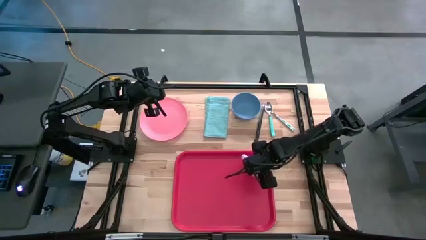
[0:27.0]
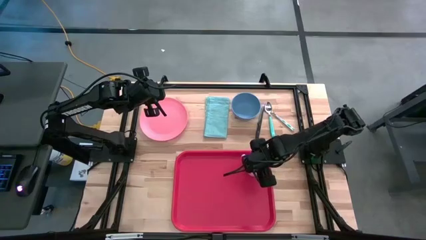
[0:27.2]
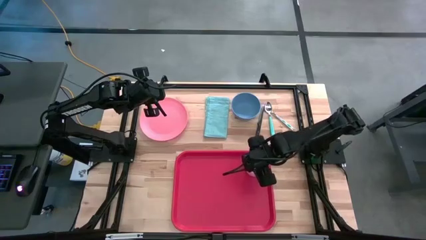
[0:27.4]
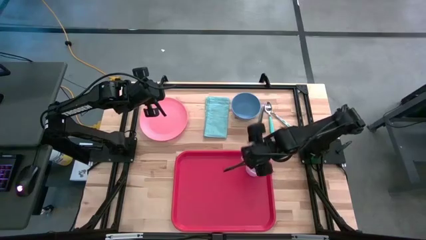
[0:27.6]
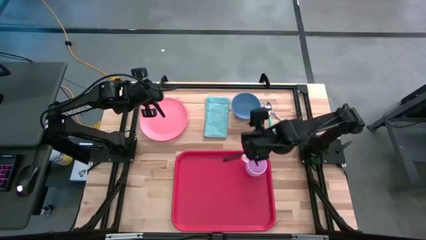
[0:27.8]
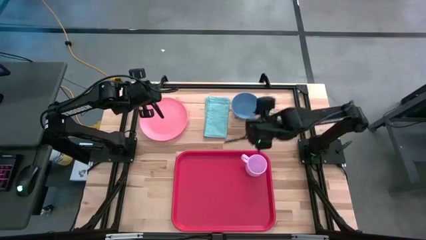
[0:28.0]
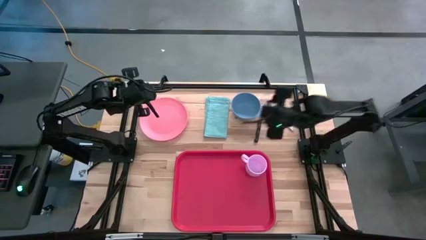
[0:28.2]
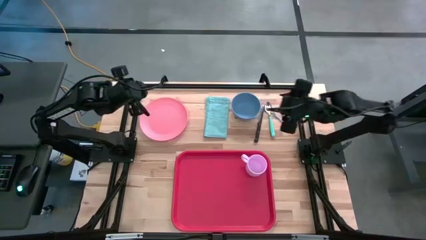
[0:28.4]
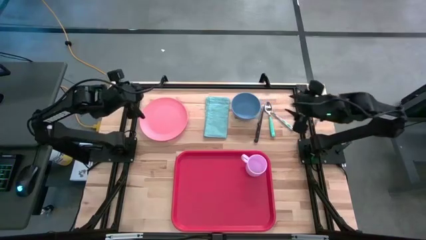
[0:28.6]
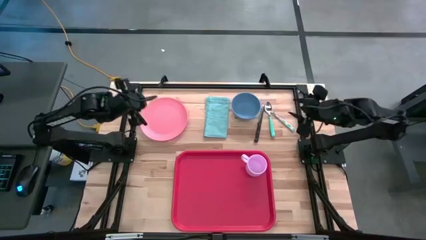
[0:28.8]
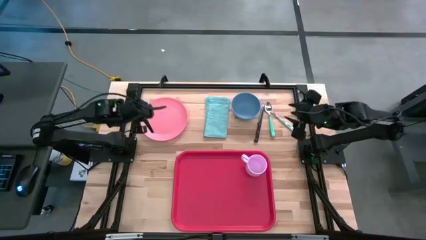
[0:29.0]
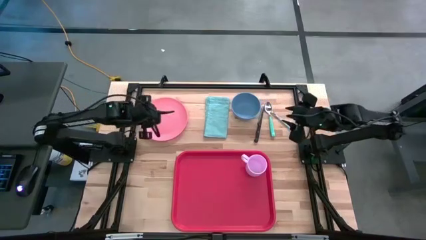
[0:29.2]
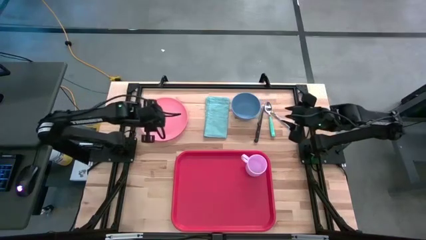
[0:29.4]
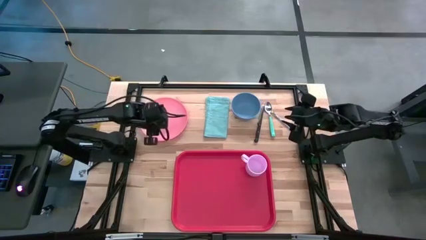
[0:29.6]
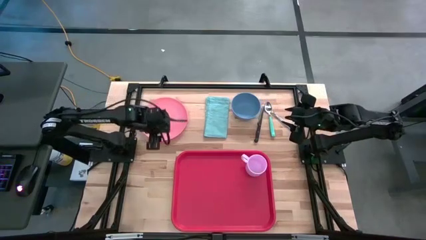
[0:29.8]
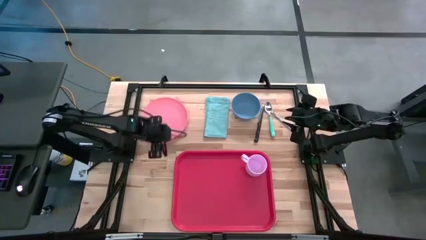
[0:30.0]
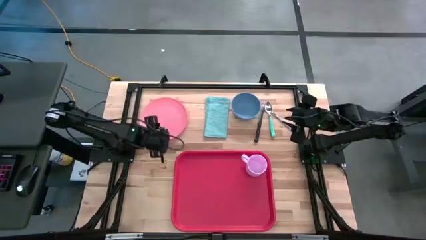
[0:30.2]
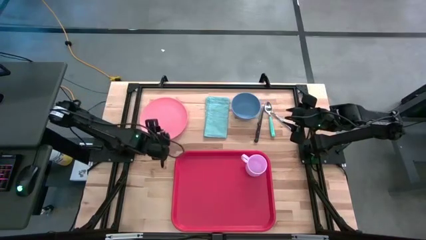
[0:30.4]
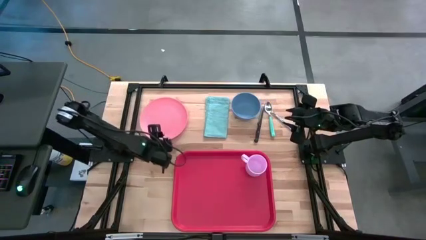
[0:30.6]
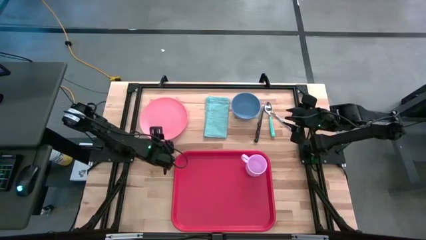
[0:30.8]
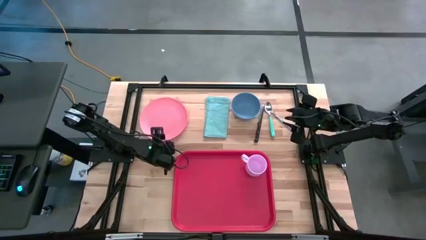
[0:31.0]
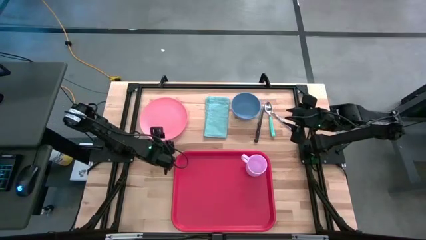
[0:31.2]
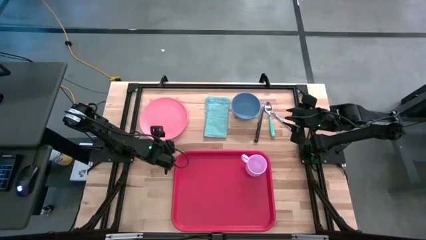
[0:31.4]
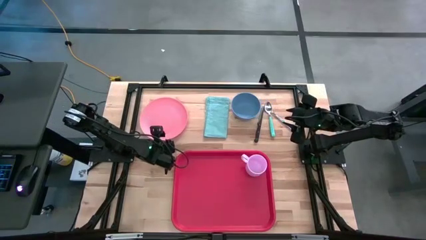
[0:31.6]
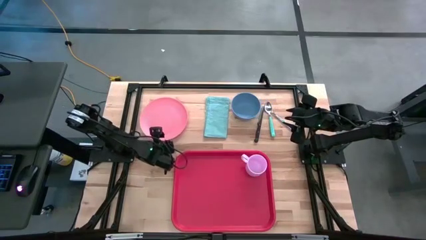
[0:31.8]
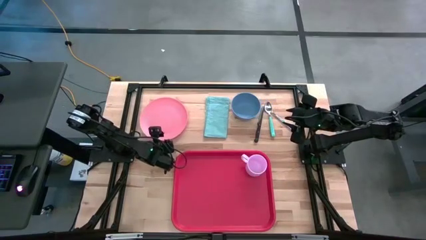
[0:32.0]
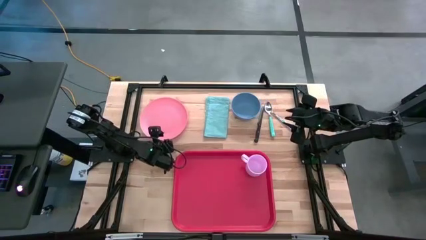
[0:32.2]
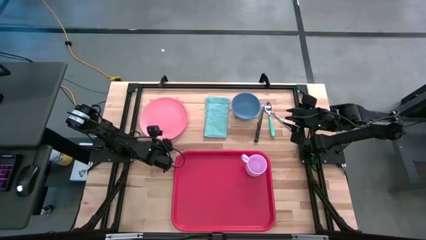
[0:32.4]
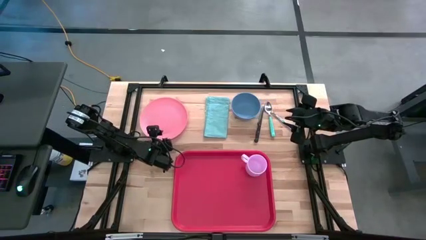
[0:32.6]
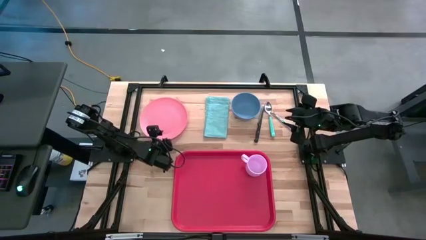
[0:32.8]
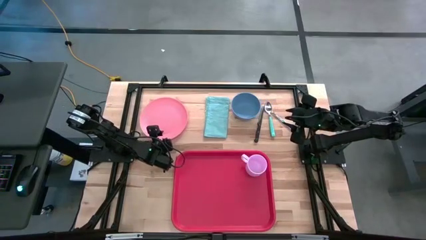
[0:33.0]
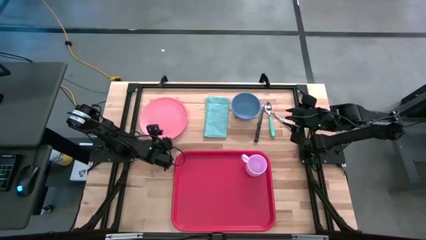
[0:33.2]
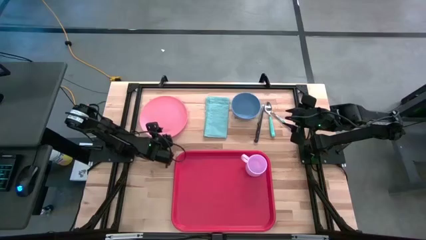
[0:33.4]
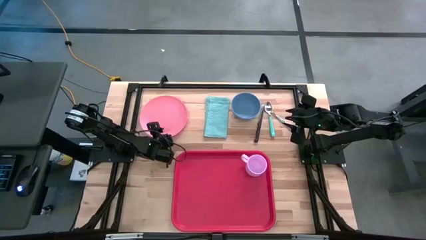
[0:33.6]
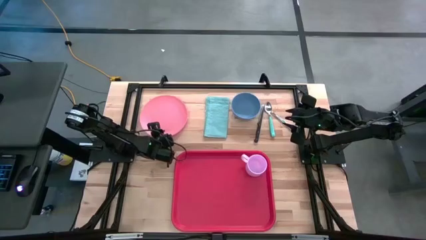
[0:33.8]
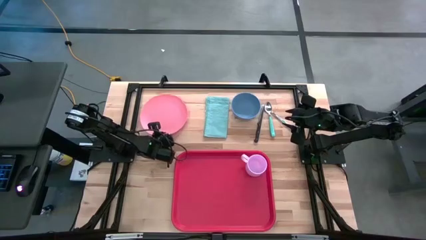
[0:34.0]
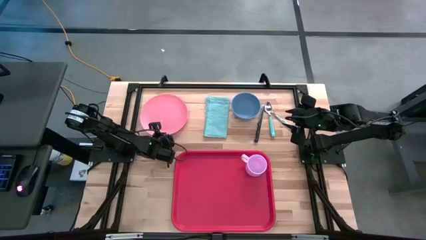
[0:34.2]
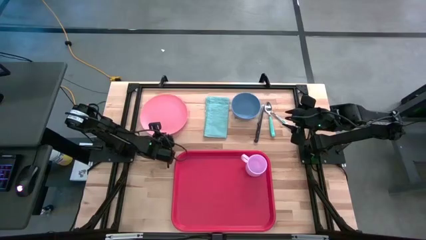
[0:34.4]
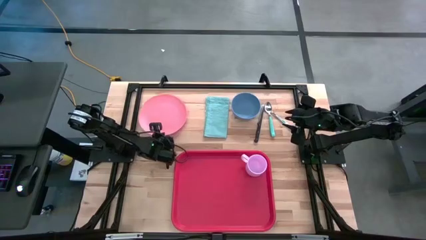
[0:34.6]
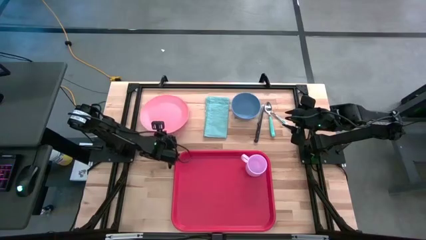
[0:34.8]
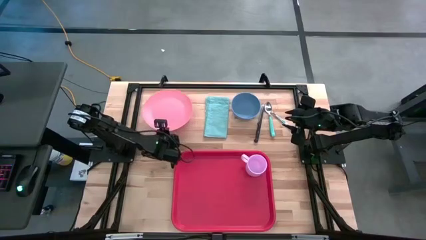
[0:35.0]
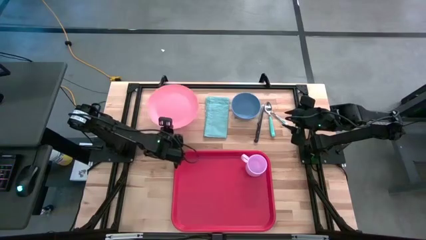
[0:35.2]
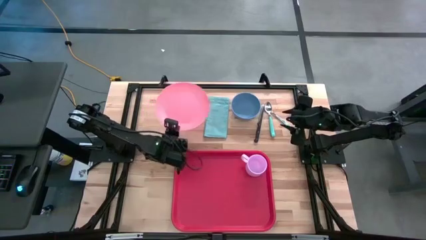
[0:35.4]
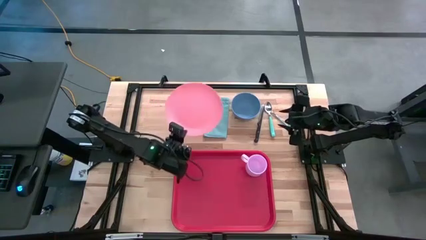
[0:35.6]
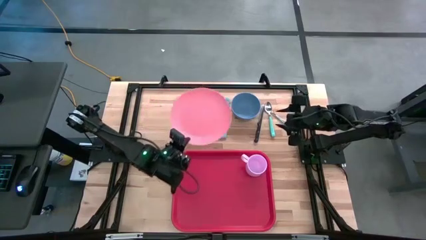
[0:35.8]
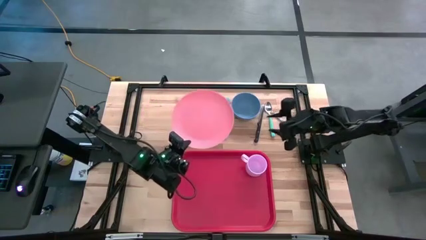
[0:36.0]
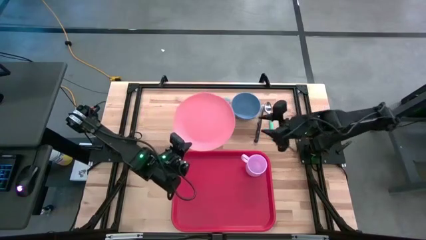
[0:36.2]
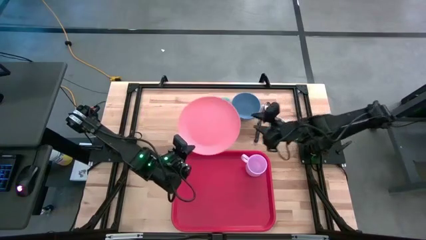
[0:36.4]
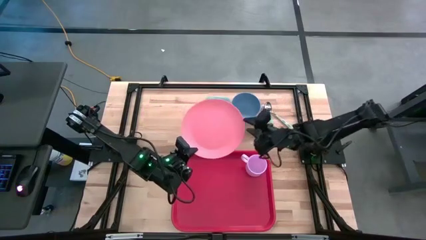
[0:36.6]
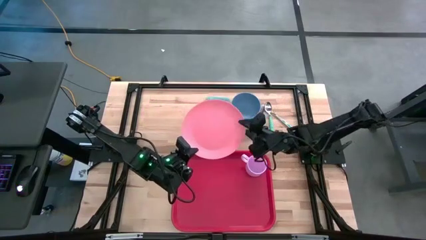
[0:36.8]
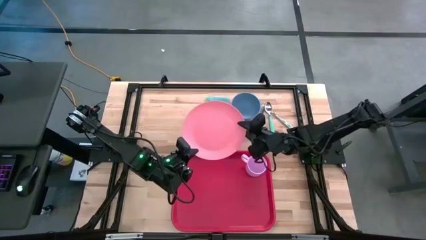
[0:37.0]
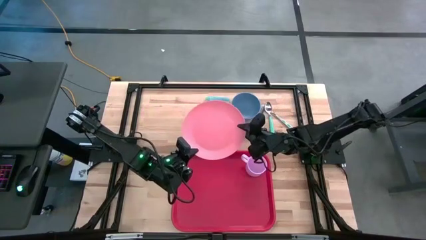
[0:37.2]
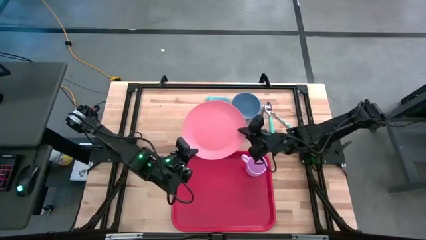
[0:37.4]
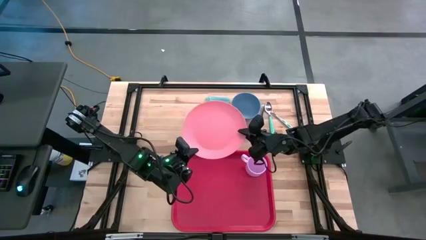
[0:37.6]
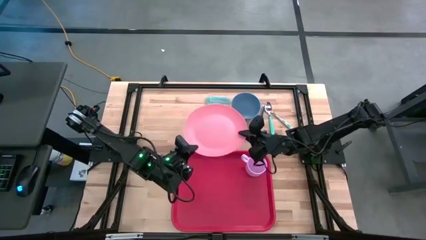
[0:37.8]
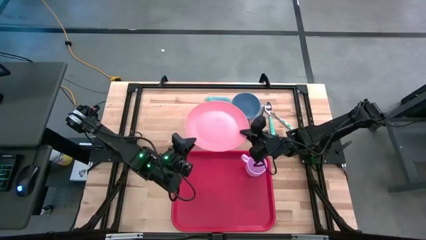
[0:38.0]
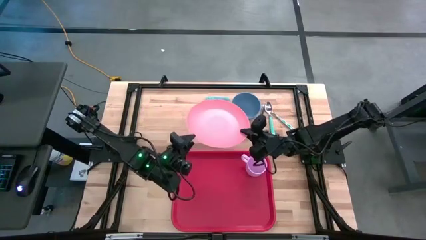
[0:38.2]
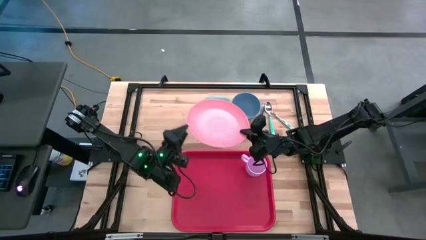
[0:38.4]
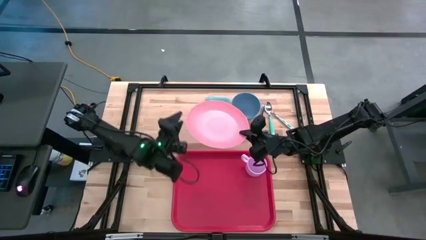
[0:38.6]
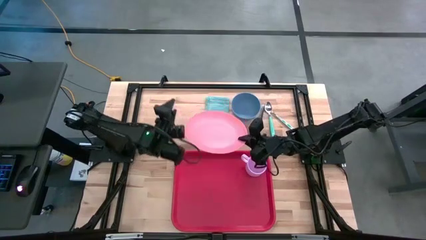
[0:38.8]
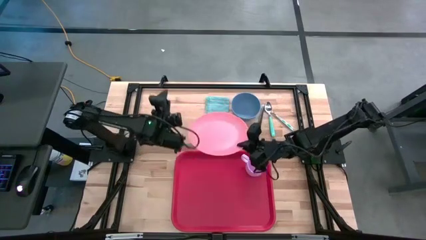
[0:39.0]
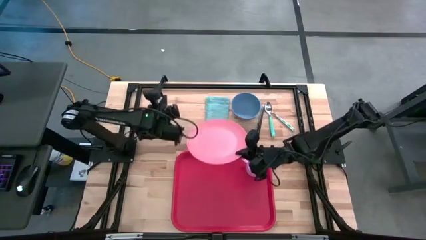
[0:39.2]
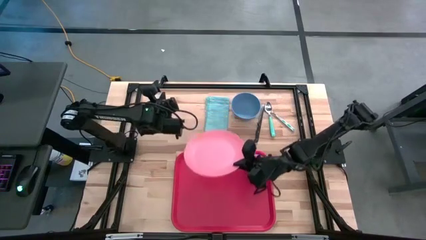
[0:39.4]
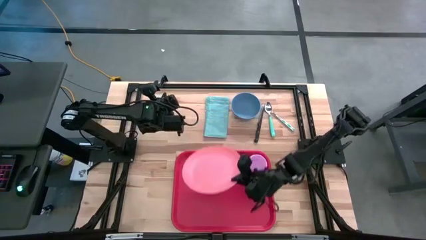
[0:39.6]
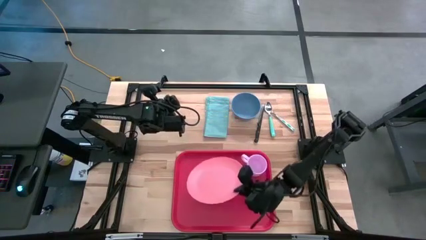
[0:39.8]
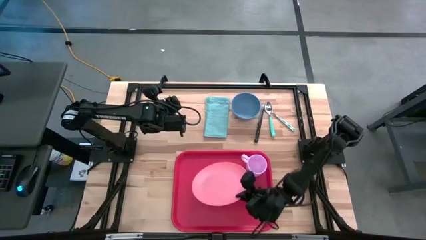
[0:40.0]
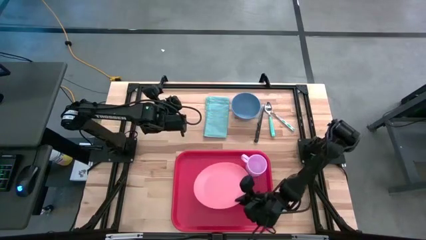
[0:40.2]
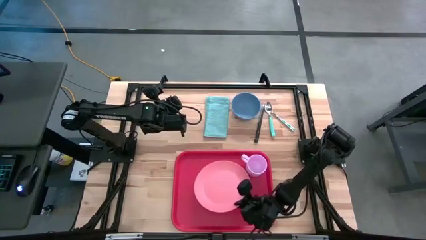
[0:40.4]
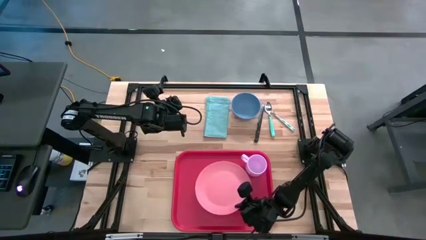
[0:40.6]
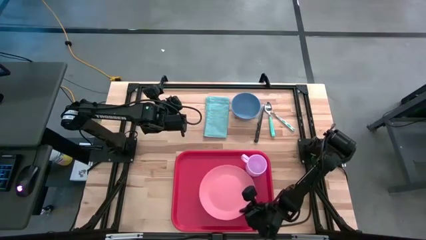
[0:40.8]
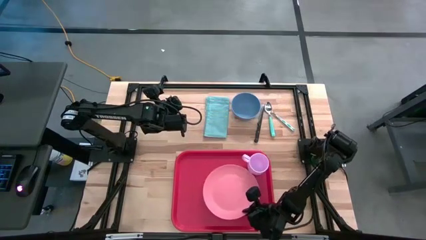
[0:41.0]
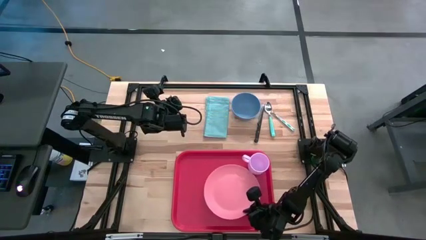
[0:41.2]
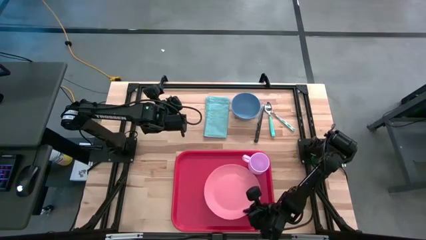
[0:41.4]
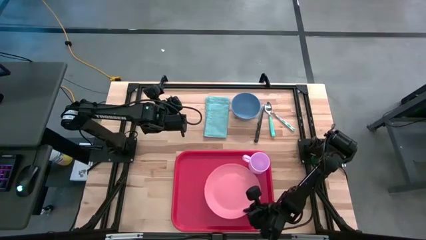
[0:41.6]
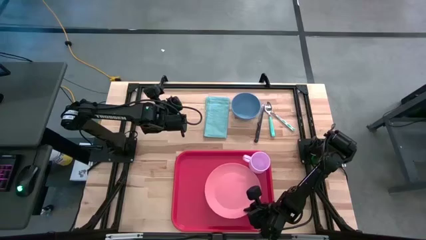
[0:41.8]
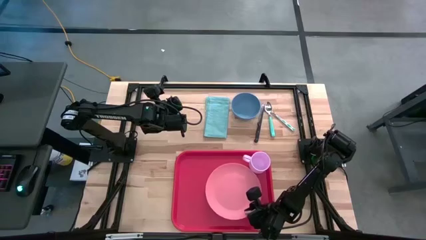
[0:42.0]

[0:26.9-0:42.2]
Task: Set up tray
Put the pink plate on the red tray

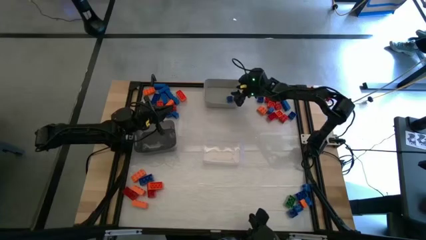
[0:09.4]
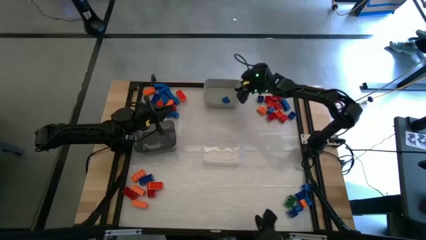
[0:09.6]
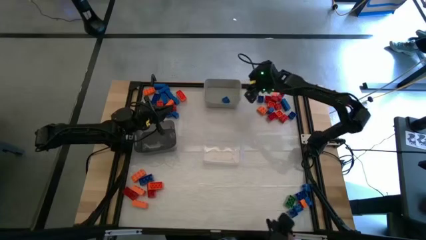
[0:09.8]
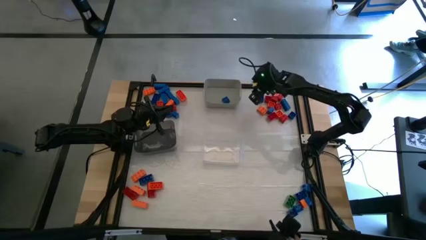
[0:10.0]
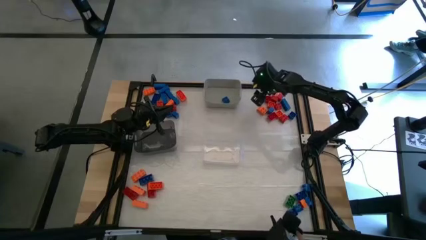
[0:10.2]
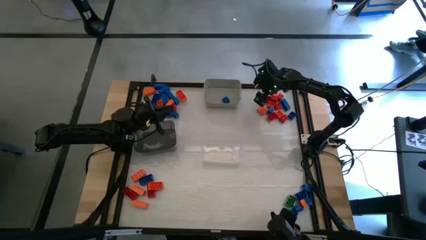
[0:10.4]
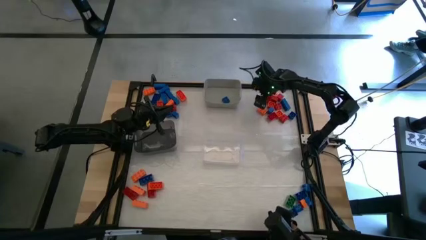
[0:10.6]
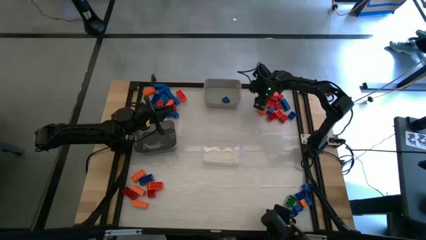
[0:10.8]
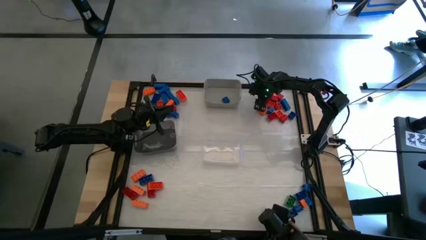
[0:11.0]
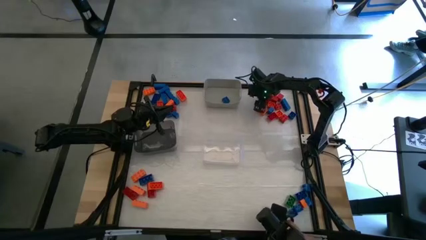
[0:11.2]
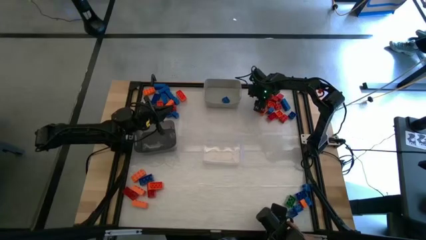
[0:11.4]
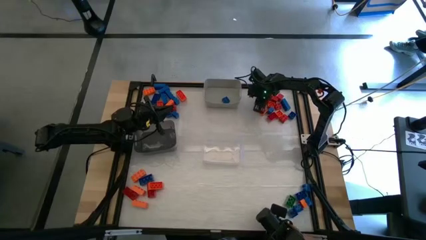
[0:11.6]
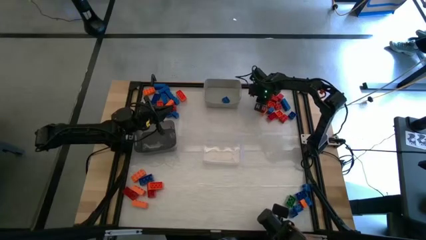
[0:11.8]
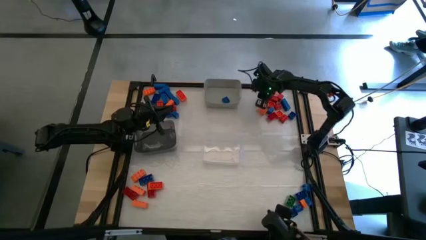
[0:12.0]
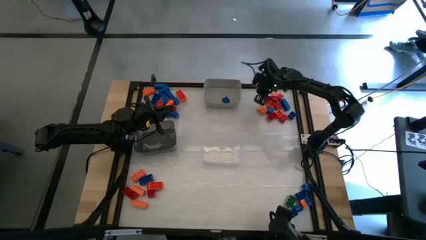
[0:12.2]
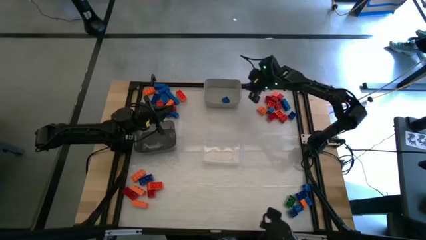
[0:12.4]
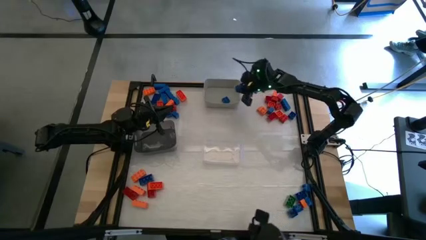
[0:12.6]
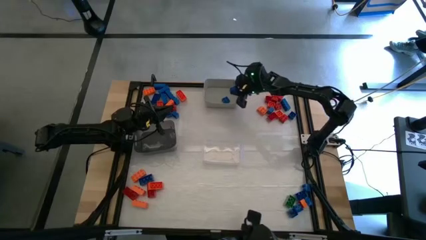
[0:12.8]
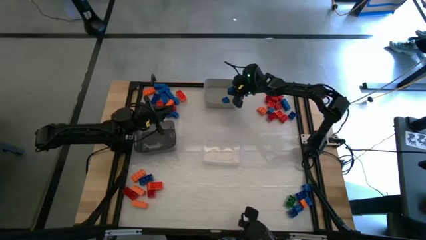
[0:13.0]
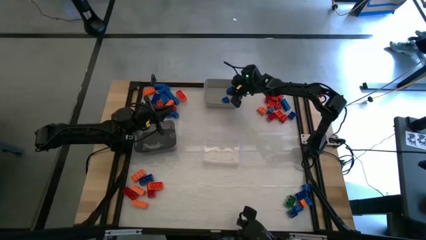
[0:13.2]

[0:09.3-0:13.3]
Task: Sort blocks by size
Put the small blue game piece into the gray bin
